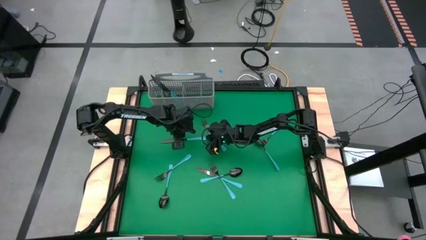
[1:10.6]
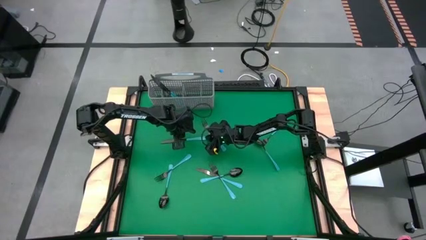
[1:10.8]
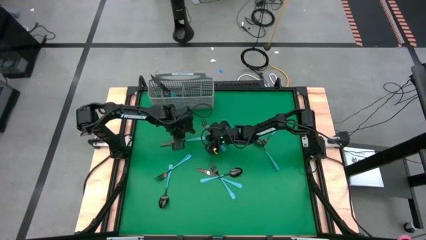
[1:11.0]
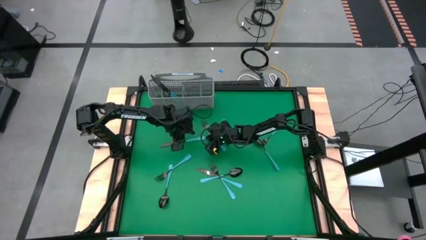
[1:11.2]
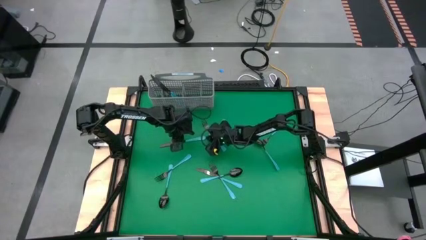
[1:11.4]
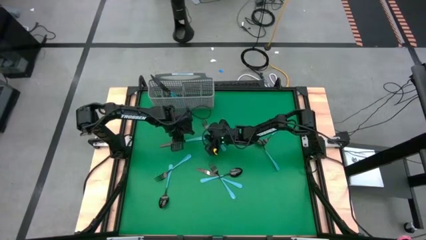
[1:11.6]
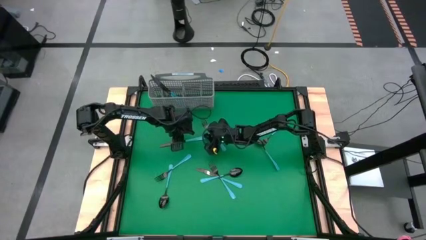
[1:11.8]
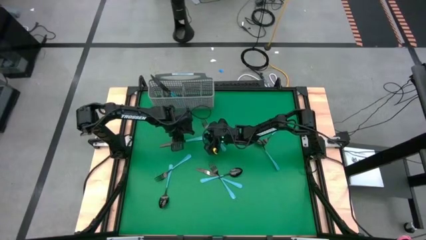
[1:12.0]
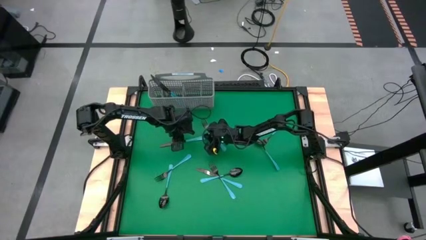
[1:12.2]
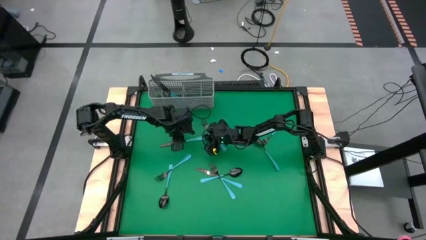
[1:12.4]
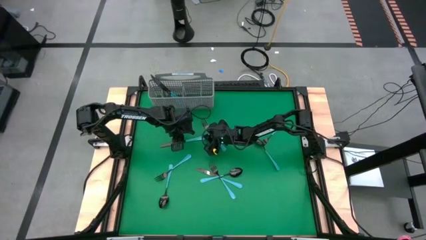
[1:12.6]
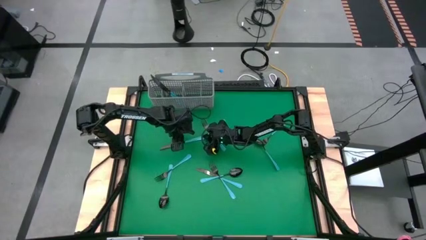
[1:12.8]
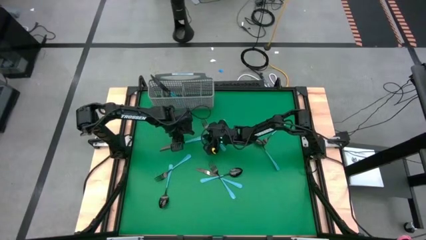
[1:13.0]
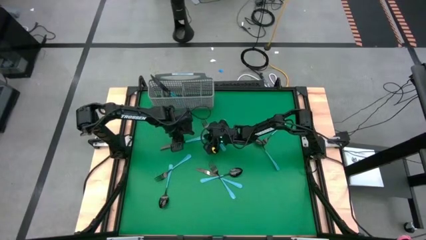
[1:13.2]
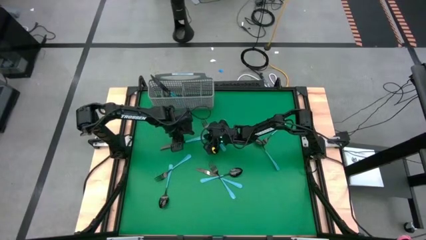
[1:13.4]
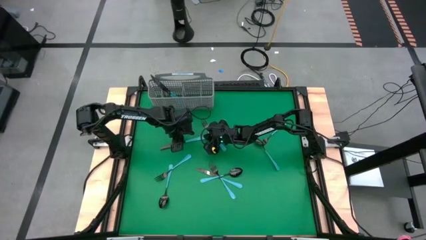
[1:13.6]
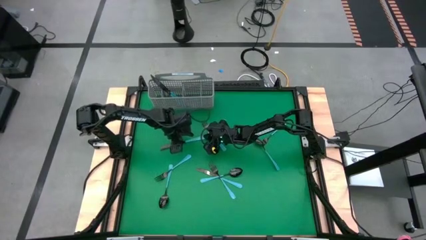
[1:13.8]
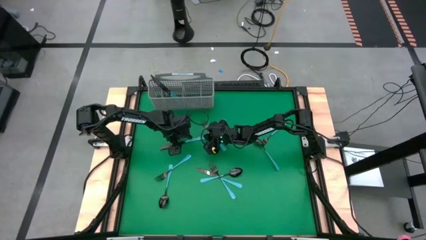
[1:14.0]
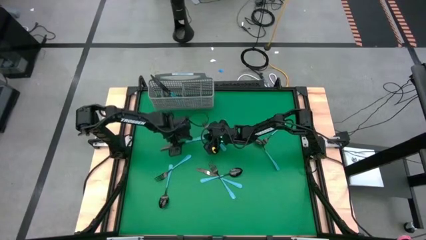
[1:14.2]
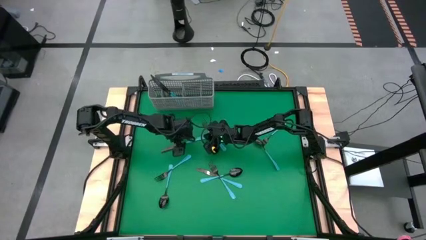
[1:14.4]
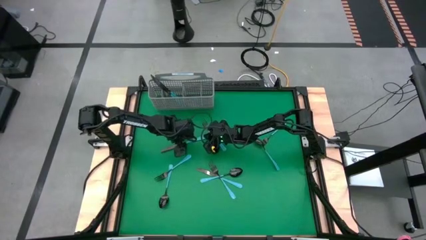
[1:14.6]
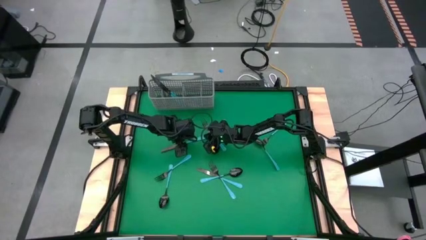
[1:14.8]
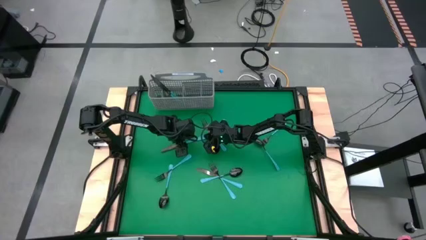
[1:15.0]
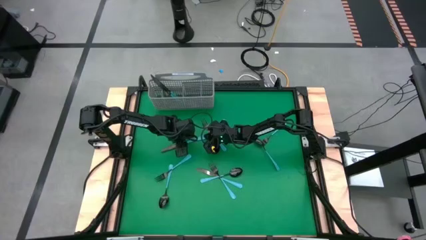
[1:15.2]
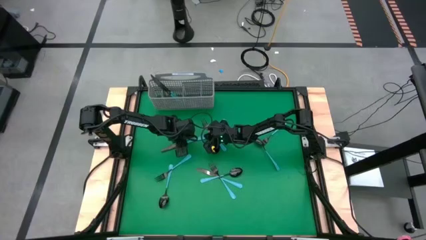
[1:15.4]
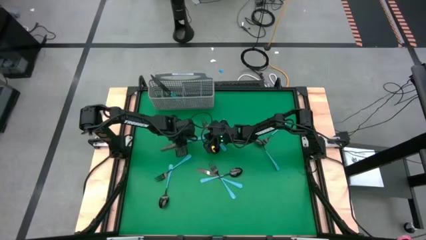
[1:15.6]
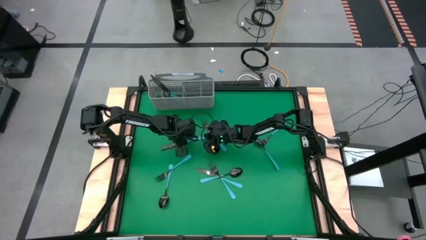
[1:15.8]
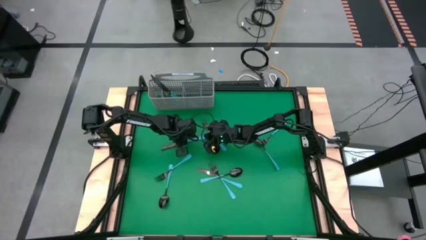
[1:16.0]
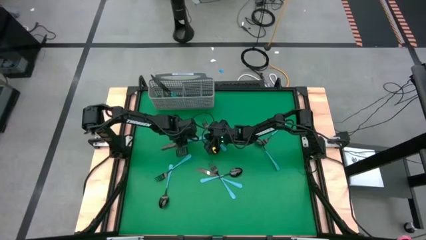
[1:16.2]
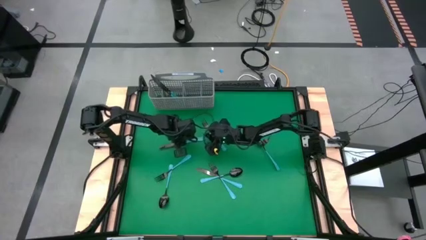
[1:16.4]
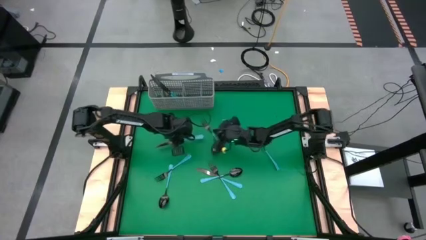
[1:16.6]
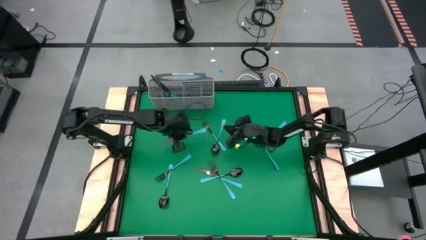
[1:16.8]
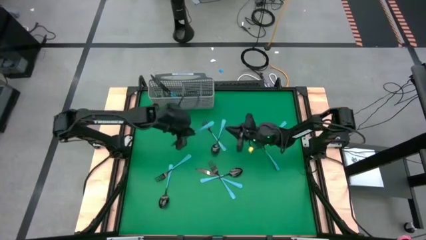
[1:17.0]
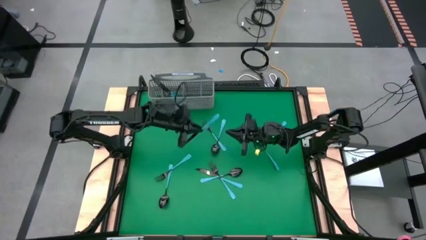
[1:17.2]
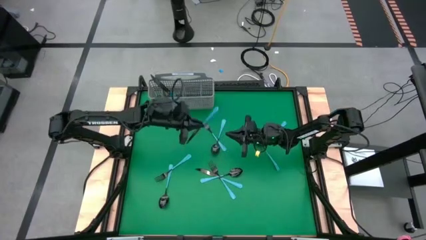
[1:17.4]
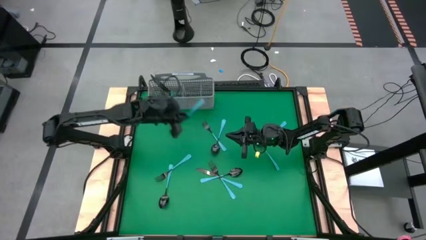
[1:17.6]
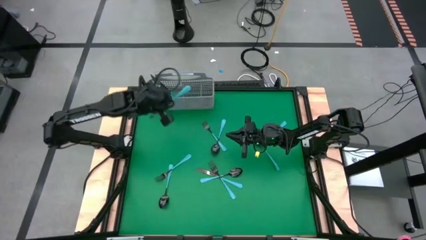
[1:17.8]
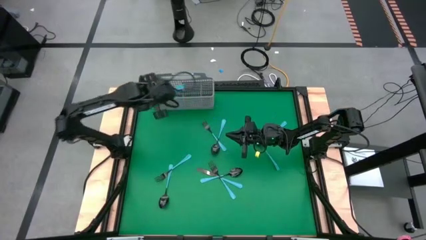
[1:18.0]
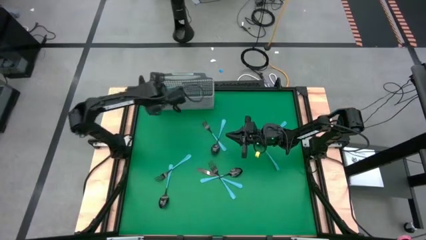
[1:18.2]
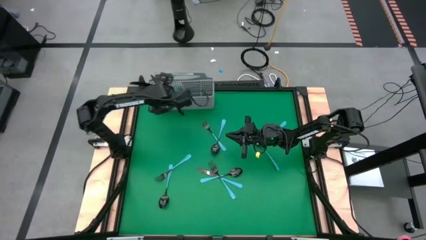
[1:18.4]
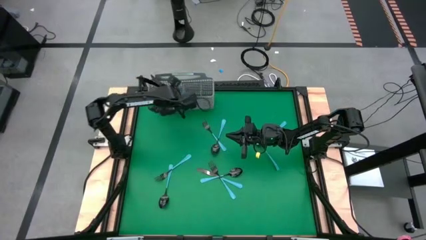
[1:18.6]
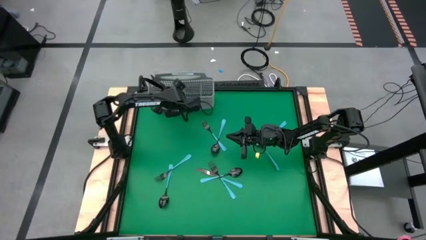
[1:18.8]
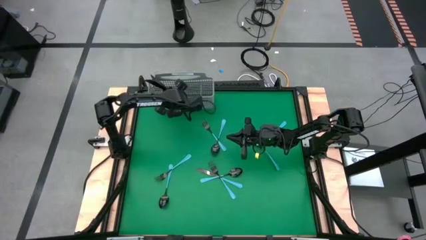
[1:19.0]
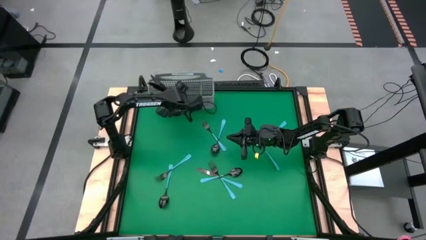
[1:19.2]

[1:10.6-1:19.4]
Task: Sort silverware
Put the table knife into the silverware rack

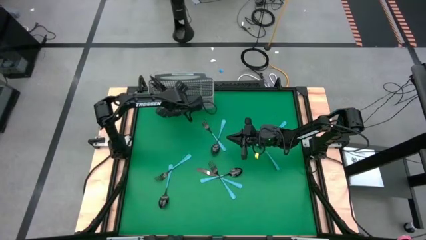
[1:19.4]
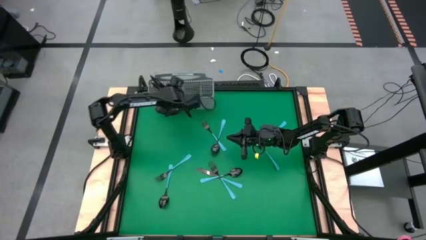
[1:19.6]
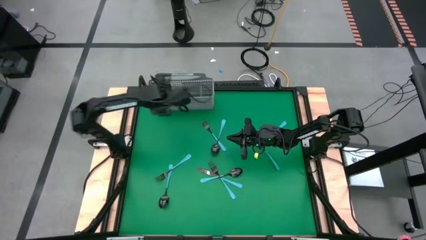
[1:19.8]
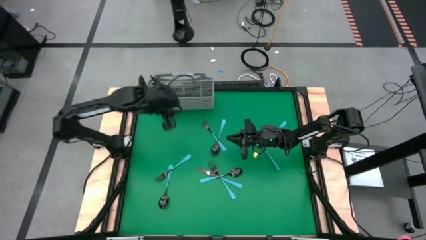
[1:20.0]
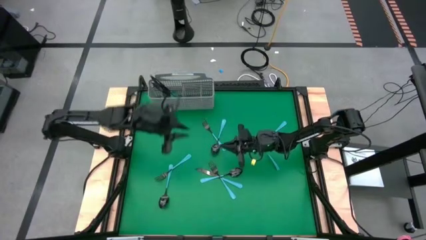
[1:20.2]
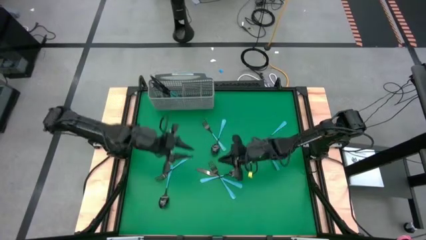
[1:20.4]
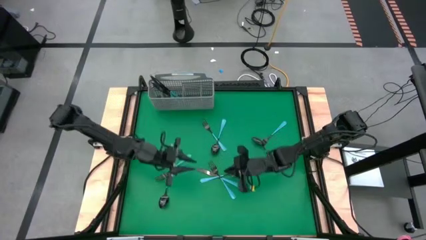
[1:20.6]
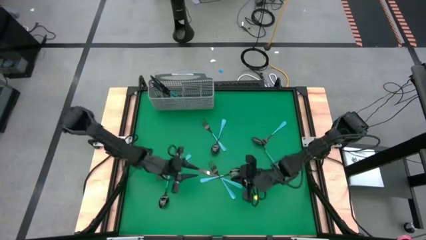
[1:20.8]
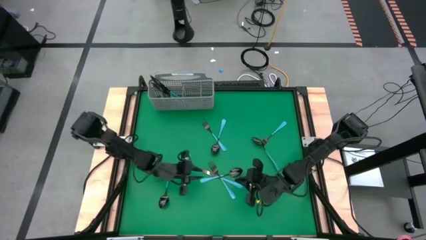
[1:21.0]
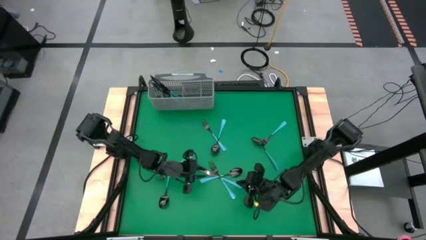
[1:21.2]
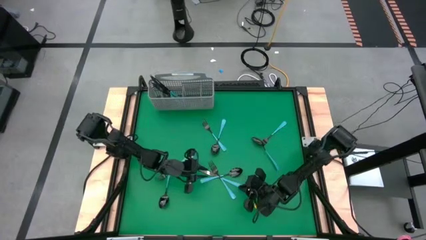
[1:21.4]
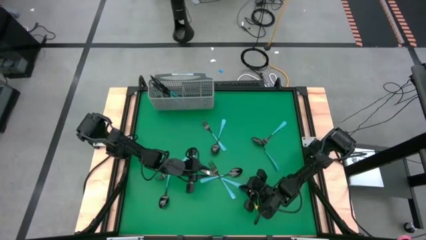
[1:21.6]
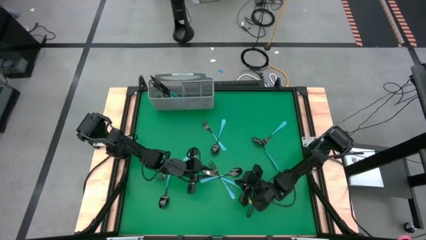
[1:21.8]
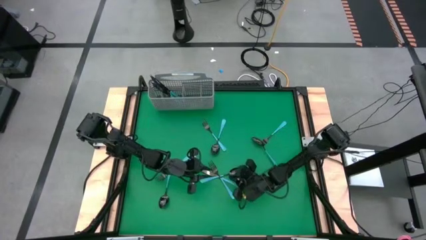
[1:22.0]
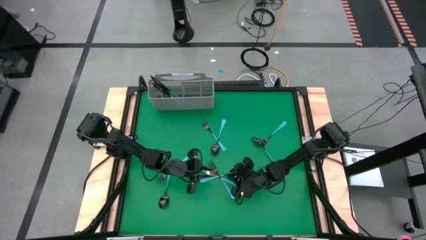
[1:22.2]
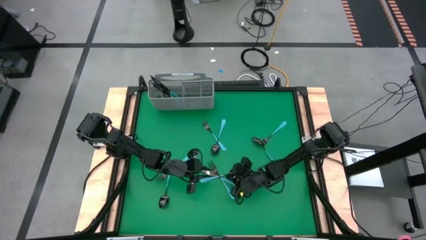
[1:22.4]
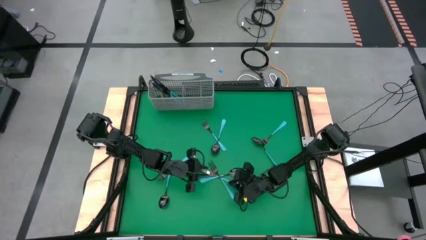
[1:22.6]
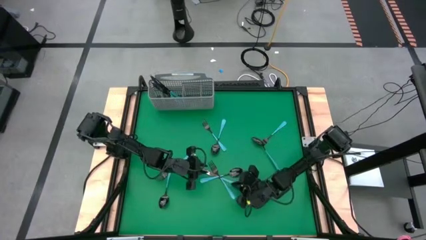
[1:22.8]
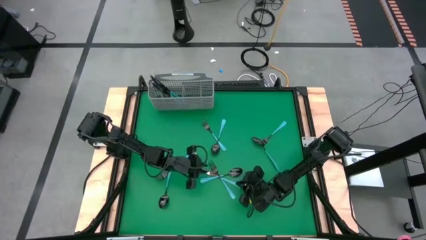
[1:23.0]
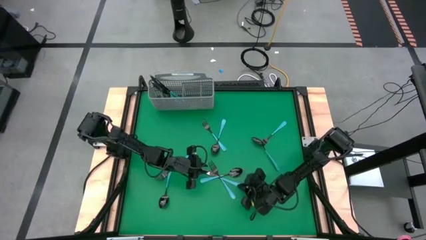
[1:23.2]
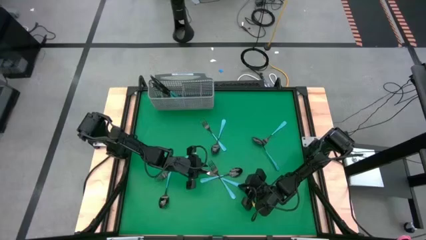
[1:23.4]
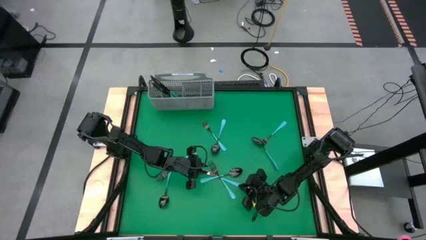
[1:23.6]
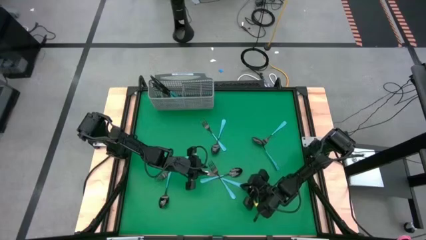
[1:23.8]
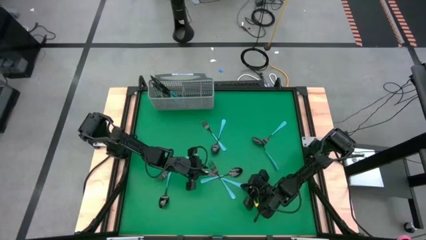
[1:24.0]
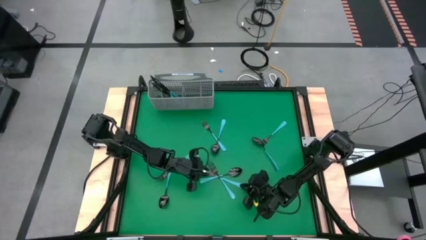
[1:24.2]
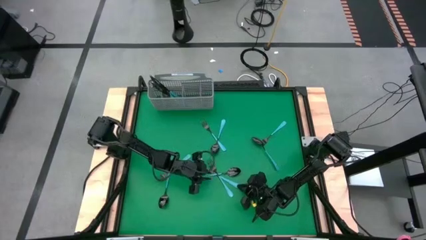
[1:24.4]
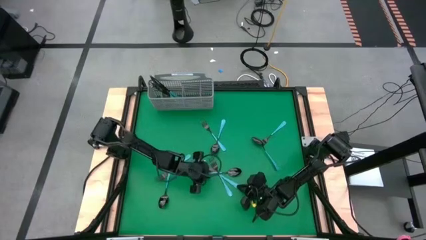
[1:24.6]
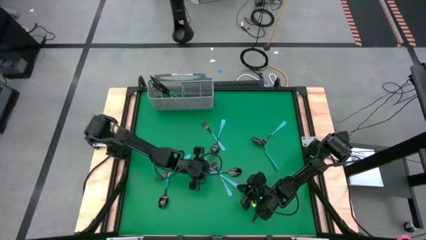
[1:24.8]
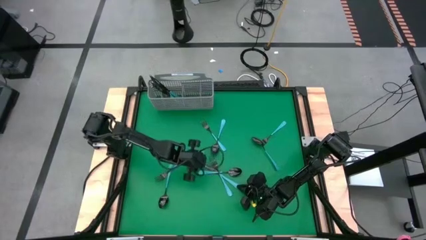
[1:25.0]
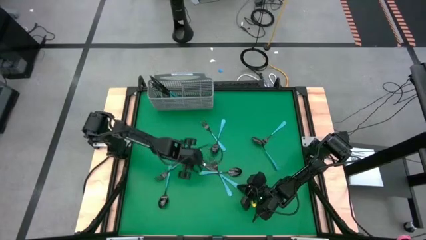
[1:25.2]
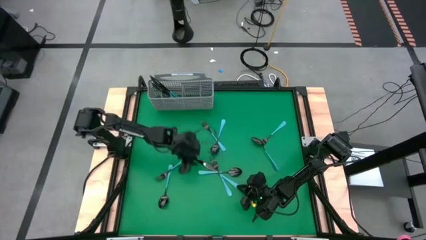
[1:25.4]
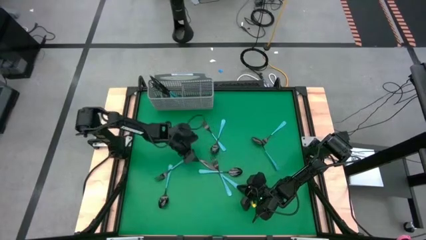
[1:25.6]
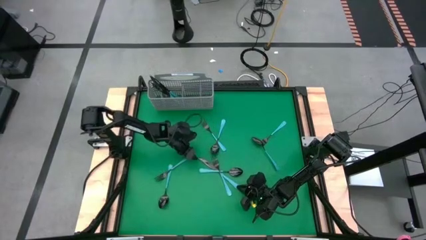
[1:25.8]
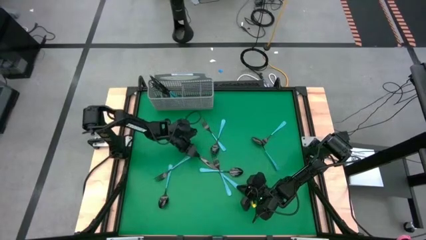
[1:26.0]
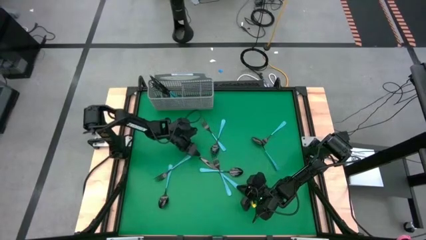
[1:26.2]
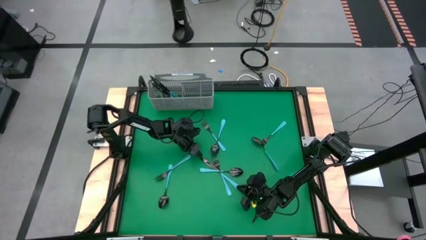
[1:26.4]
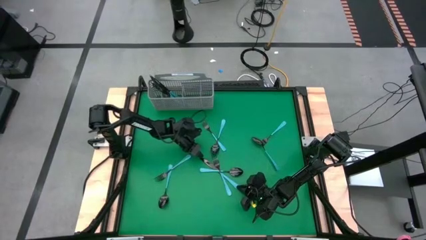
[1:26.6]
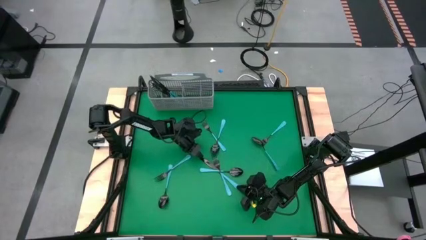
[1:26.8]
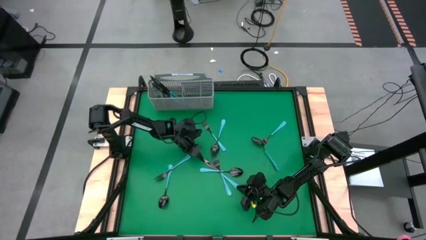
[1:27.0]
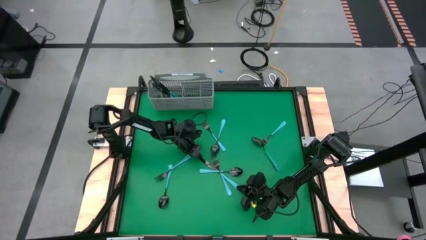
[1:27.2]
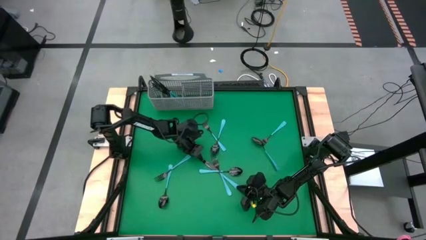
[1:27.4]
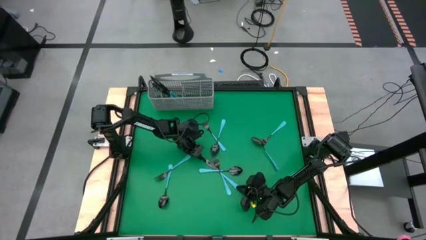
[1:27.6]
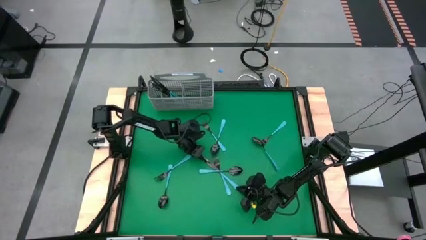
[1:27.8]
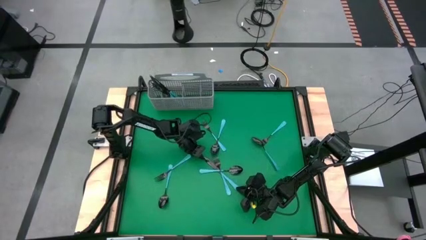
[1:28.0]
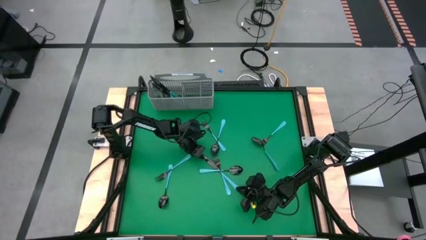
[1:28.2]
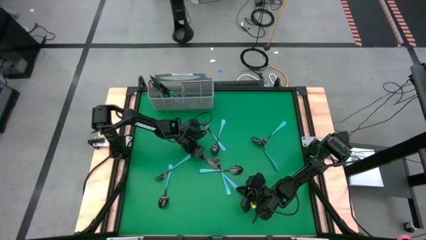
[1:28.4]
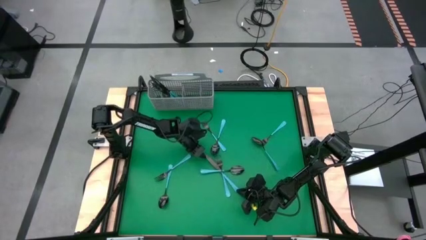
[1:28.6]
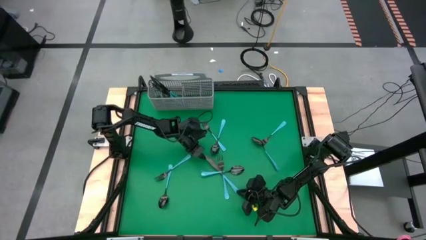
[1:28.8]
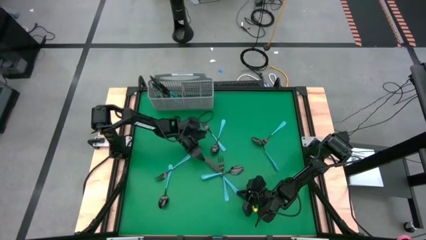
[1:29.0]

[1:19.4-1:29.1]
Put the table knife into the silverware rack
